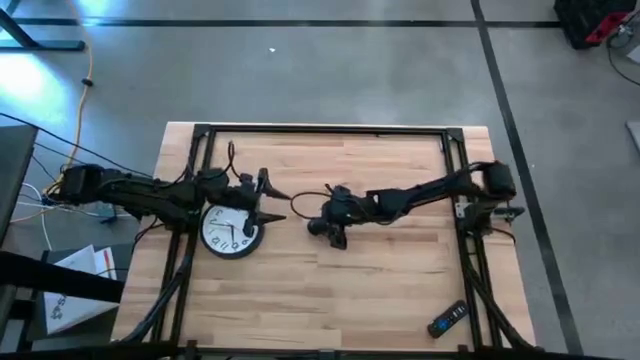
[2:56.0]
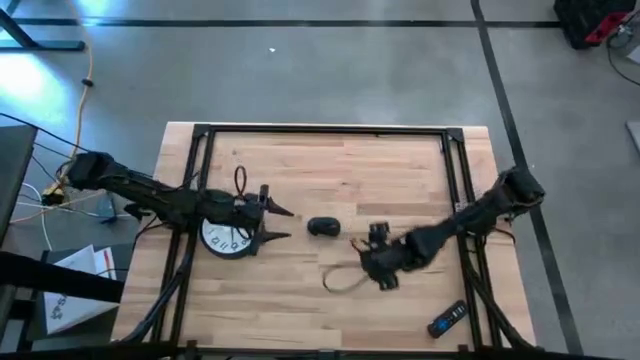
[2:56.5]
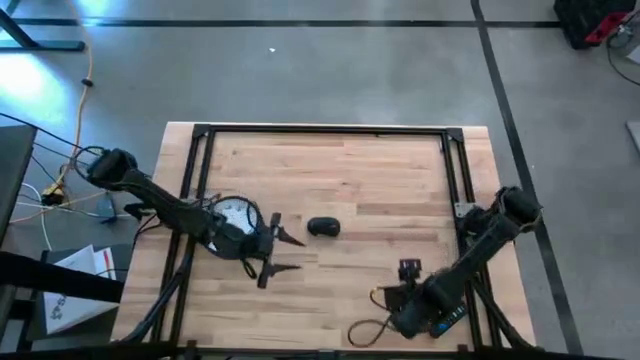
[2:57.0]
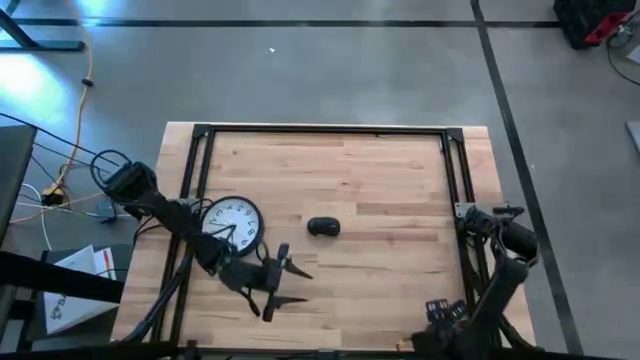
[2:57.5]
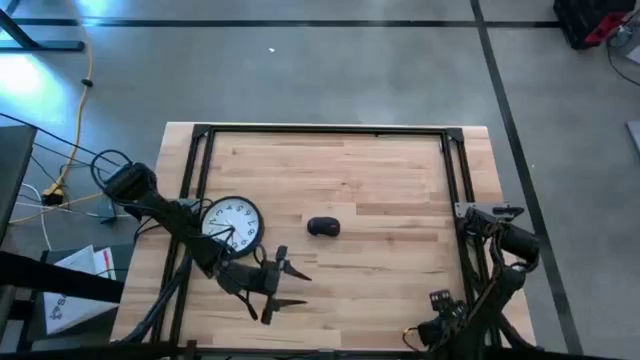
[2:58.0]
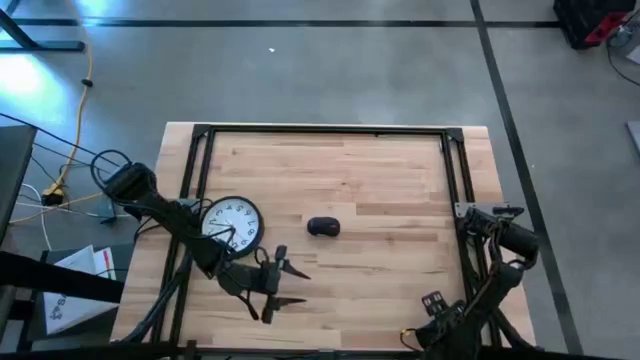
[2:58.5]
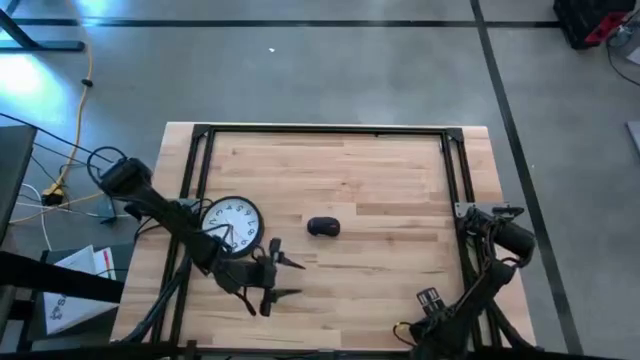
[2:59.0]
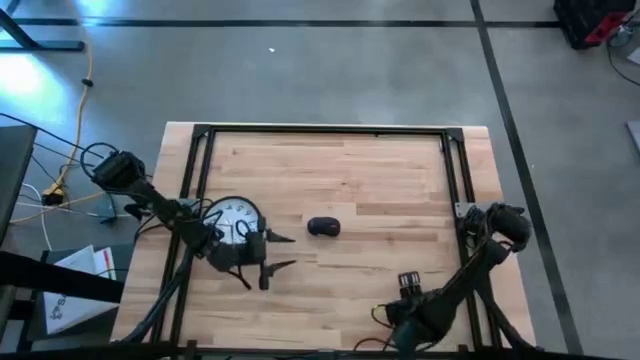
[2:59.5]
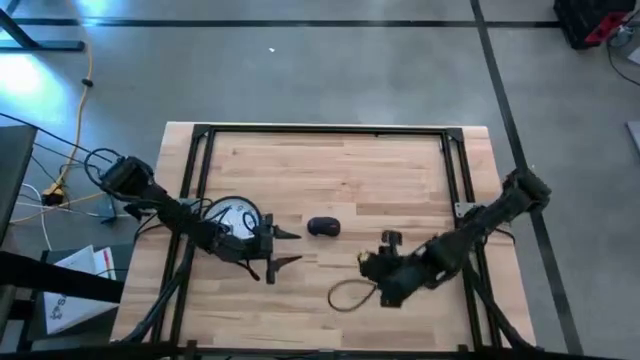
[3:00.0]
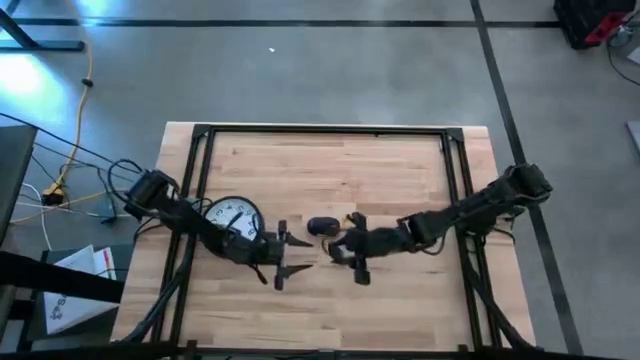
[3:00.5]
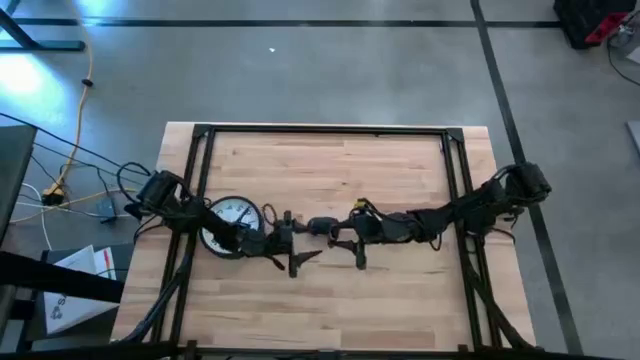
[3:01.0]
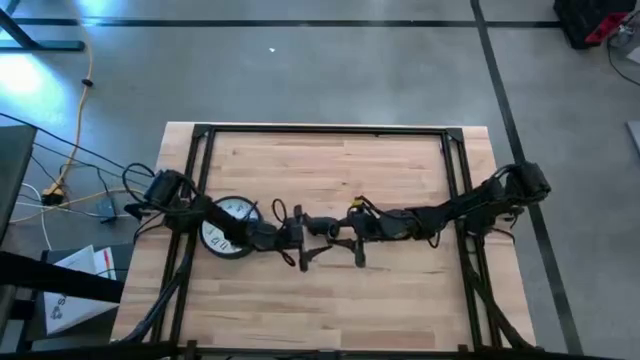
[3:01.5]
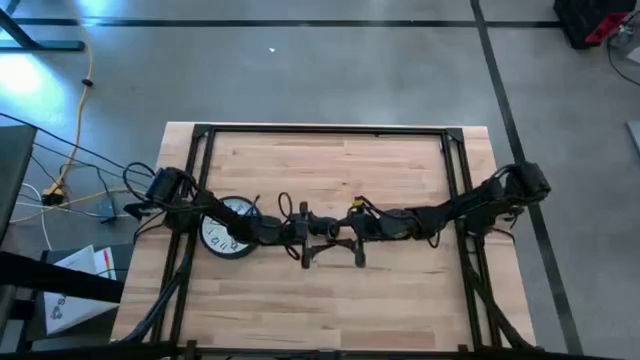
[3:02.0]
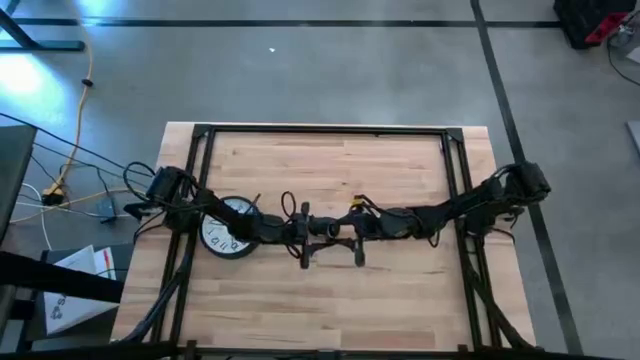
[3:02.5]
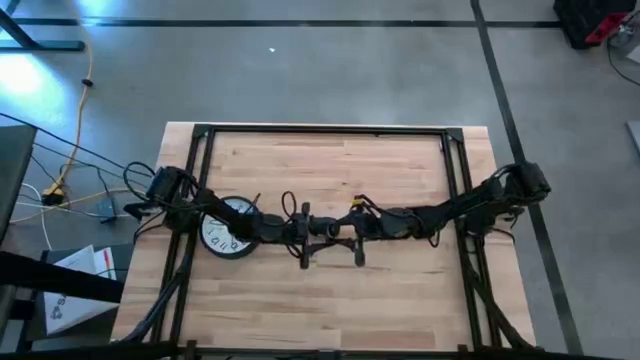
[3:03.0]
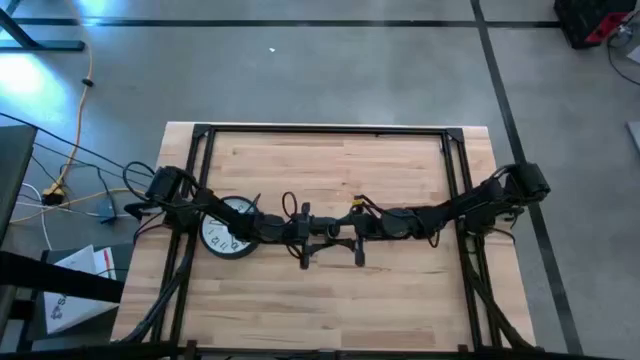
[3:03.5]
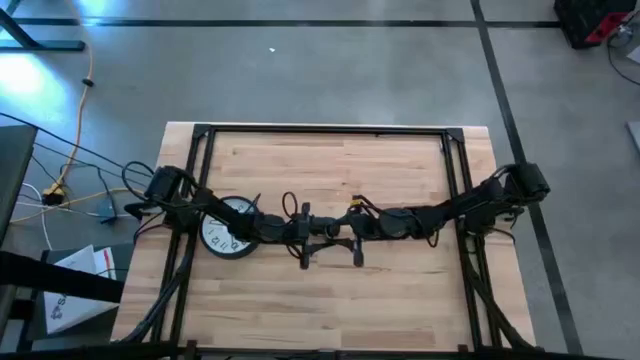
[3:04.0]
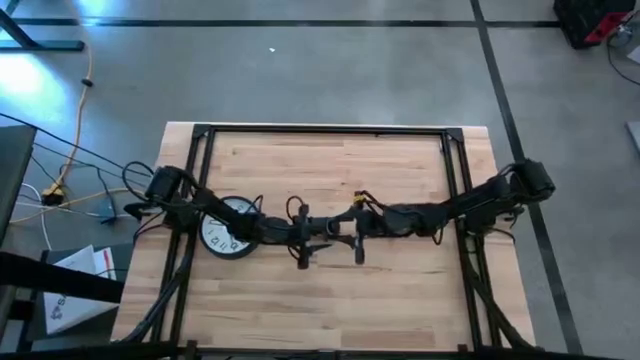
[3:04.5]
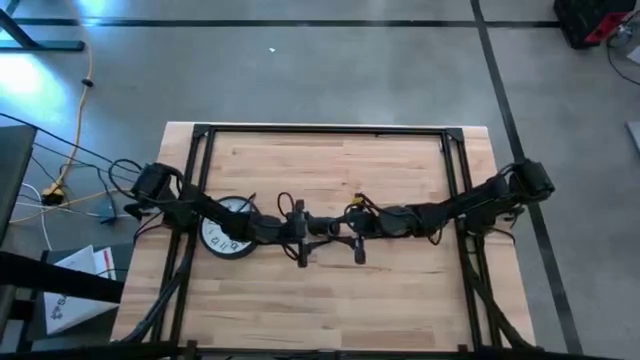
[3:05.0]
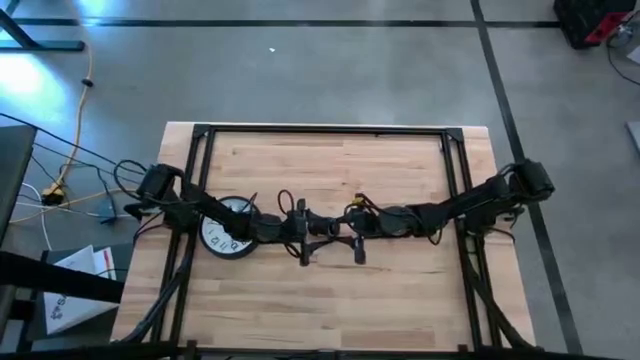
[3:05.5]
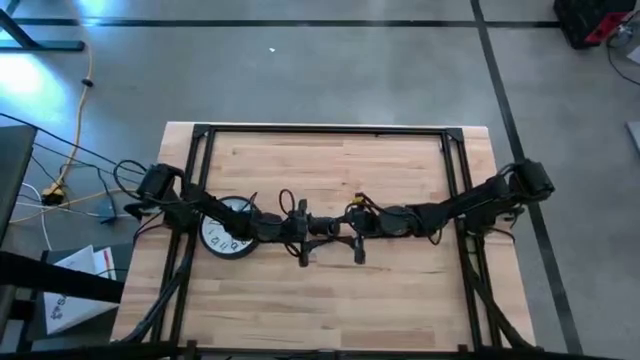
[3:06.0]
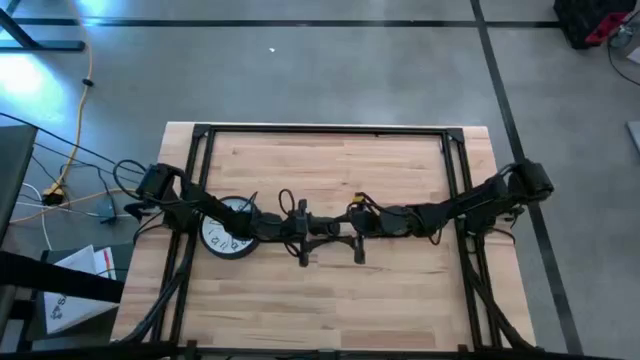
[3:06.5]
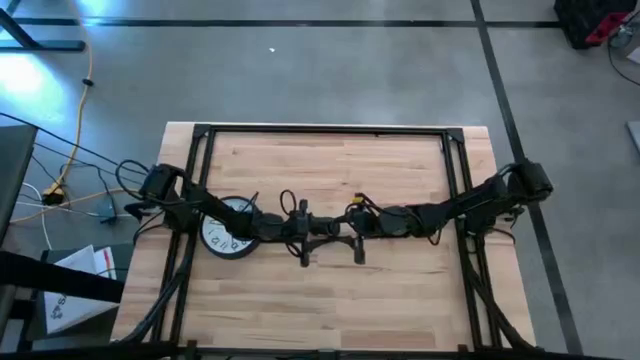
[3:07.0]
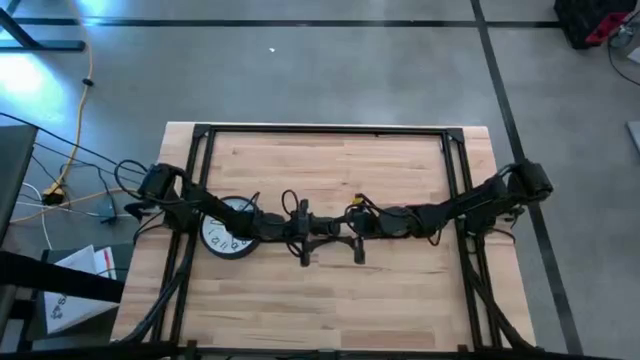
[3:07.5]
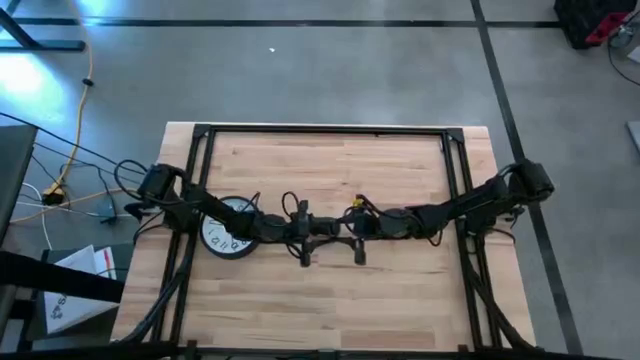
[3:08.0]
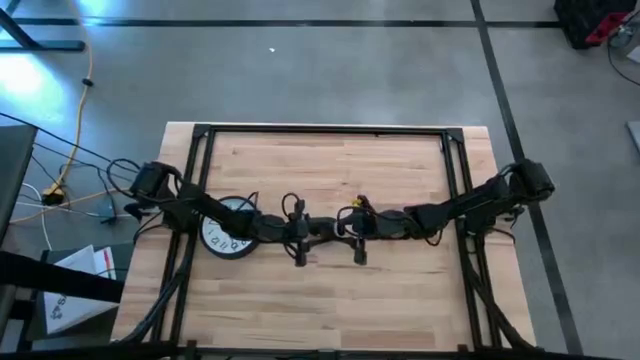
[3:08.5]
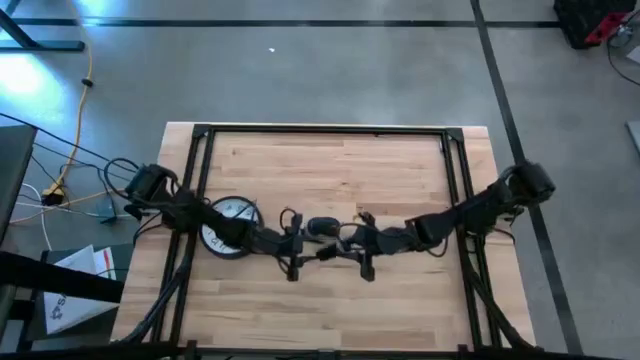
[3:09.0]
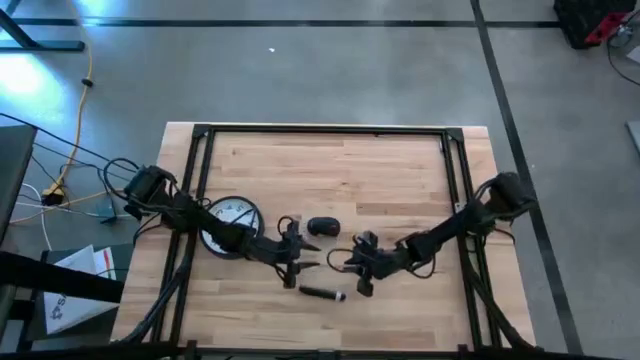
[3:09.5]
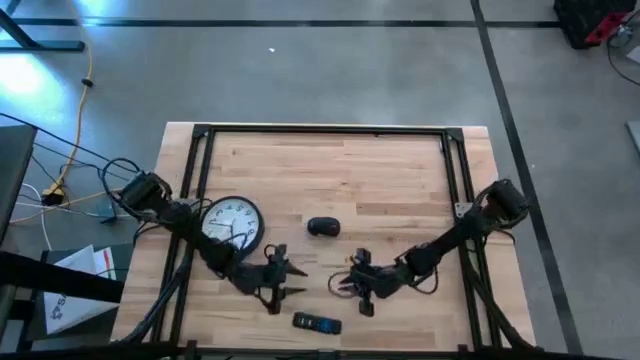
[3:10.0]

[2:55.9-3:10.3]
Task: Insert battery
Open the black remote battery compartment

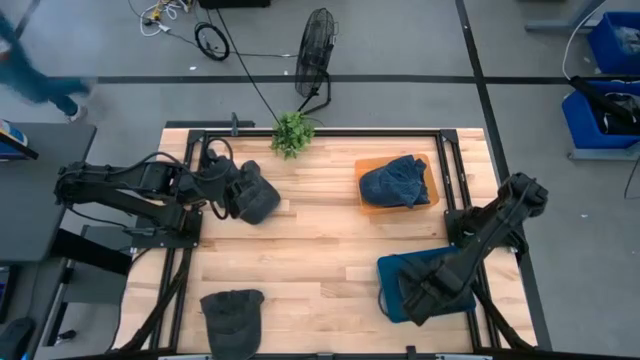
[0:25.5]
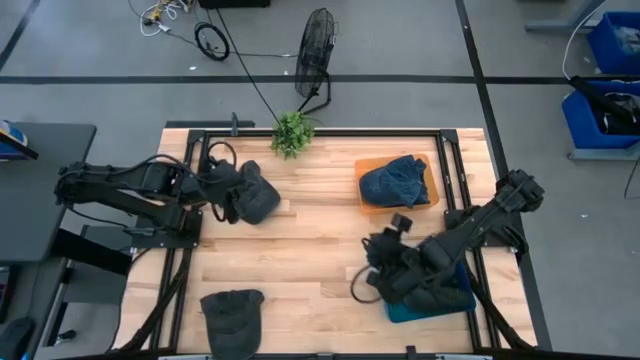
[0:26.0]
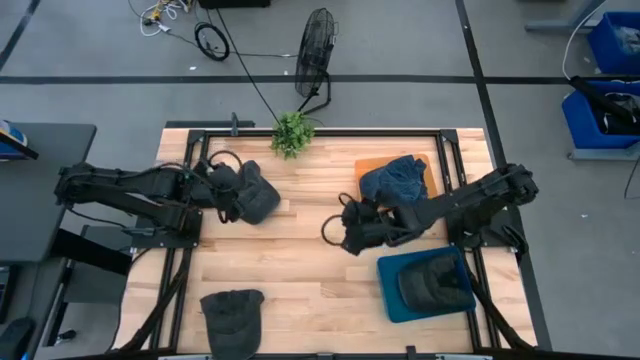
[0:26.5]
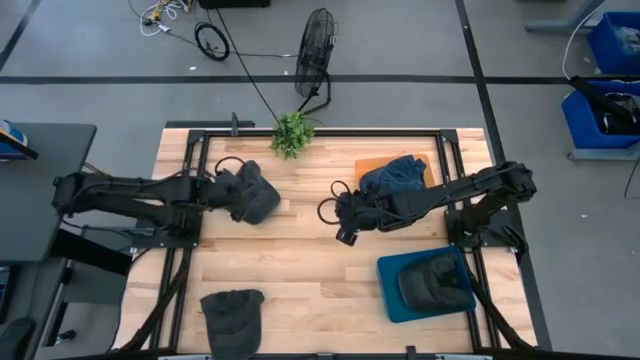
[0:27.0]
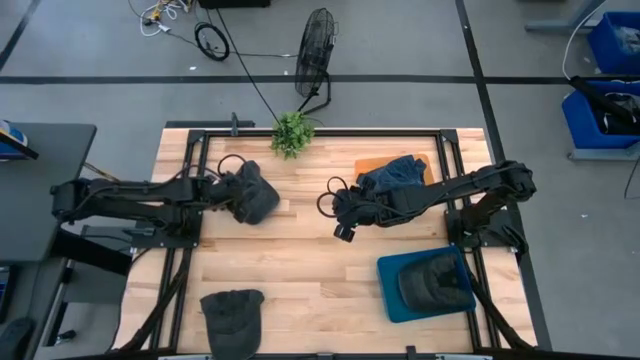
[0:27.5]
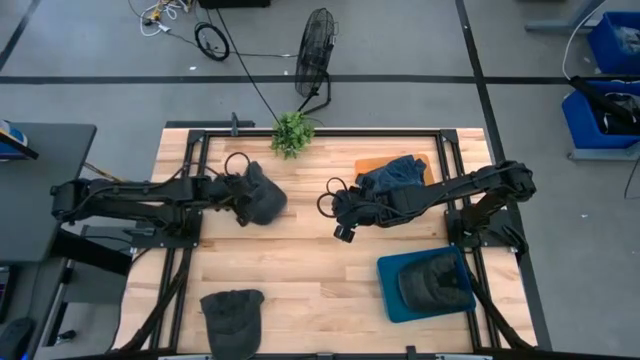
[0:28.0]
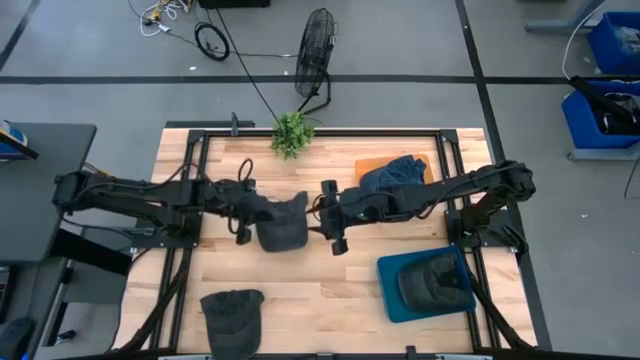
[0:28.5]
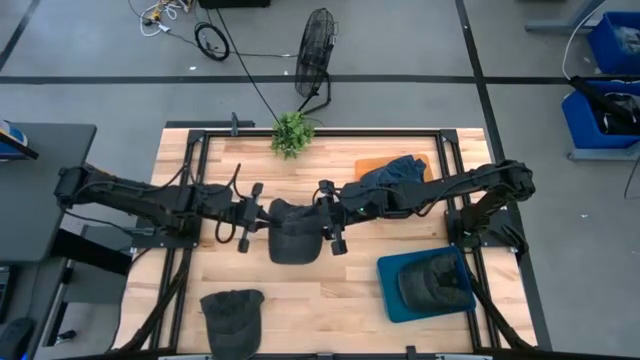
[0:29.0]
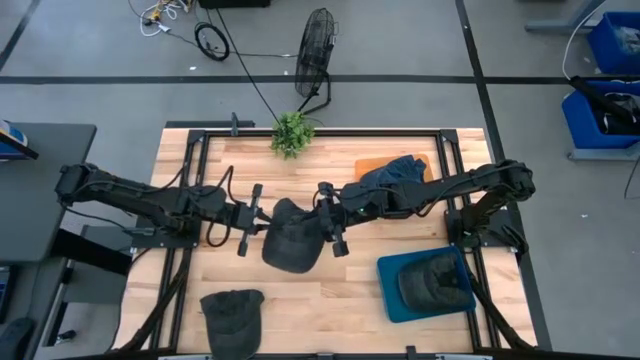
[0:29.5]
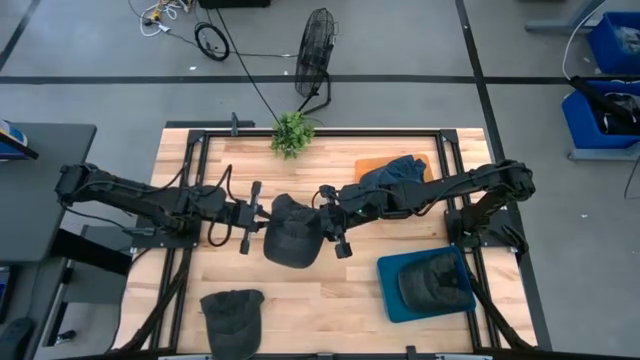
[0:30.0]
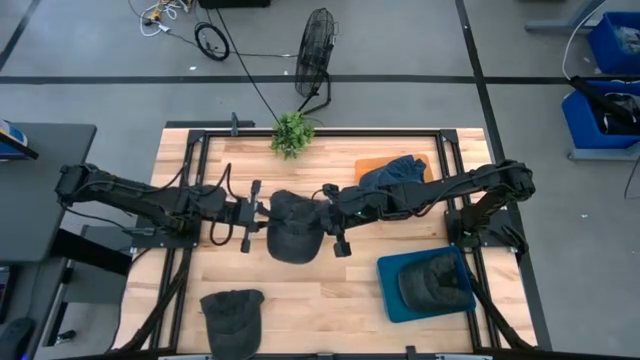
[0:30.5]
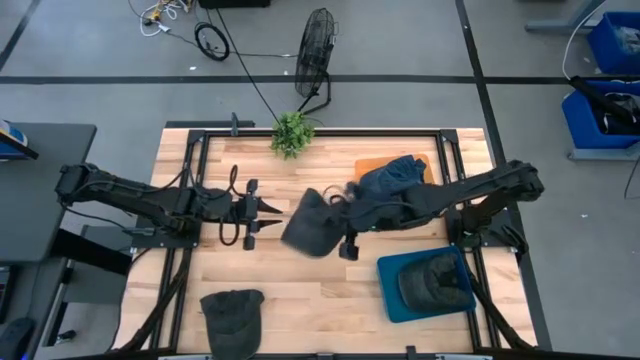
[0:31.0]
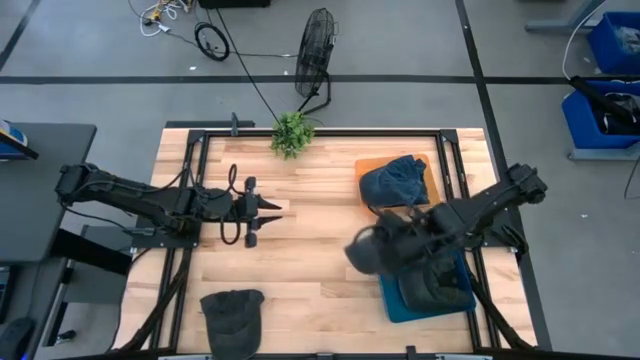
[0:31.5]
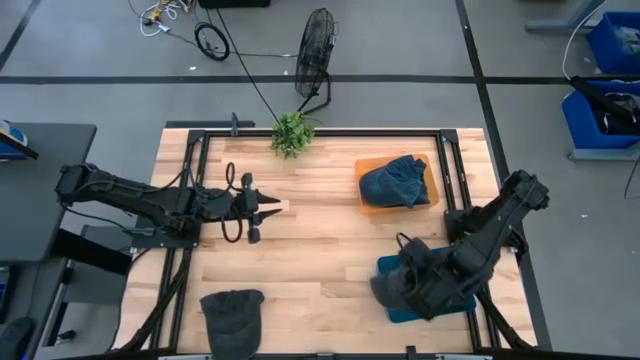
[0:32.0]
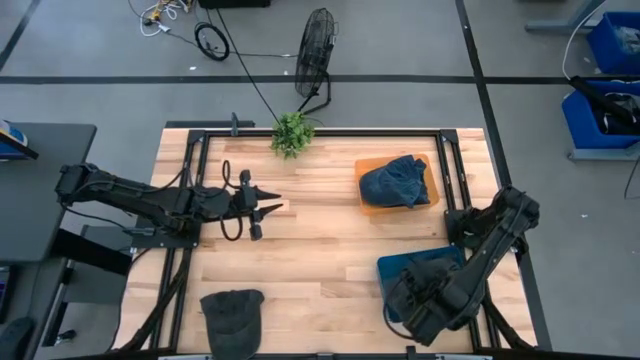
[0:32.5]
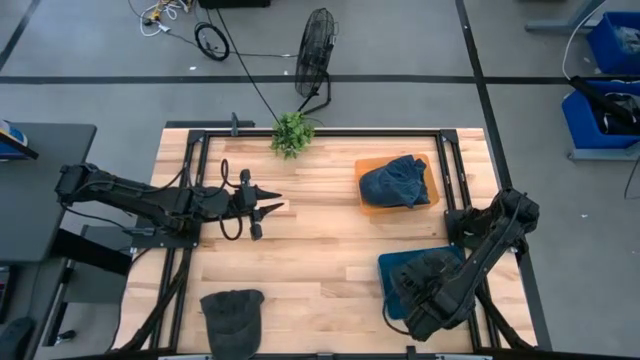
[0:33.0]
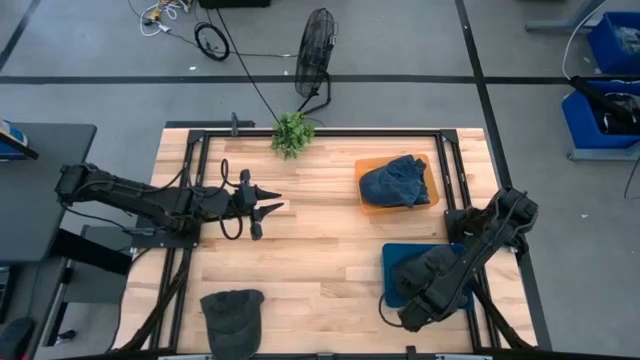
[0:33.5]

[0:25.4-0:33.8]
Task: Pick & Place hat
Put the top black cap into the blue bin
